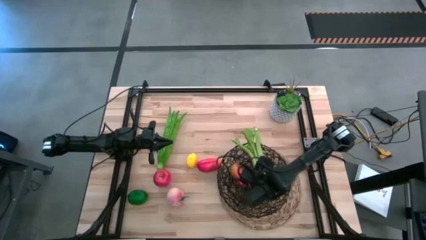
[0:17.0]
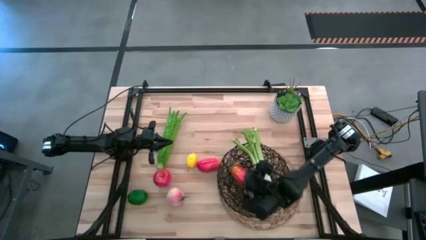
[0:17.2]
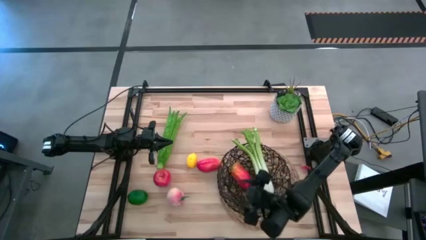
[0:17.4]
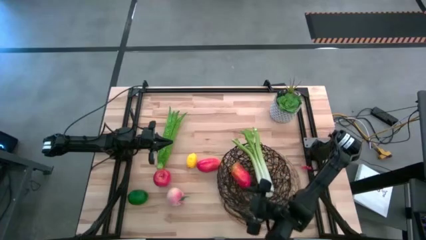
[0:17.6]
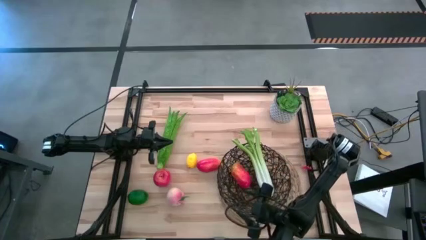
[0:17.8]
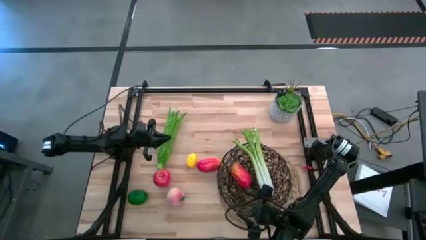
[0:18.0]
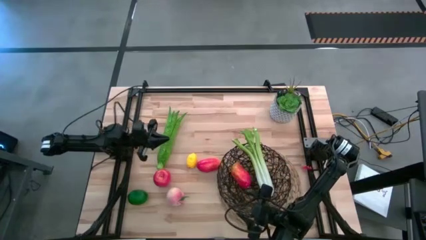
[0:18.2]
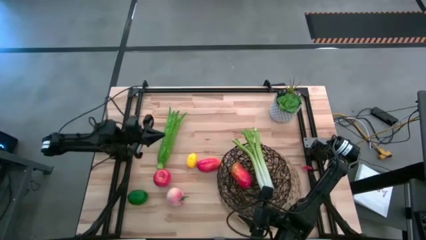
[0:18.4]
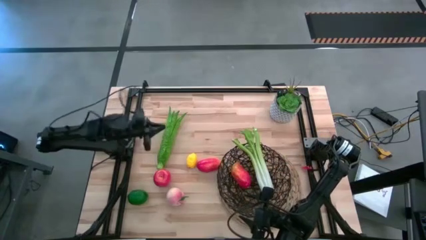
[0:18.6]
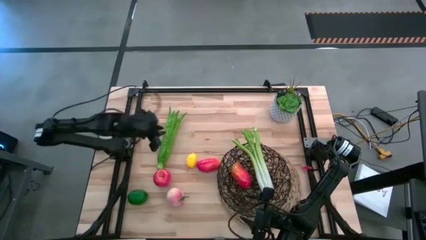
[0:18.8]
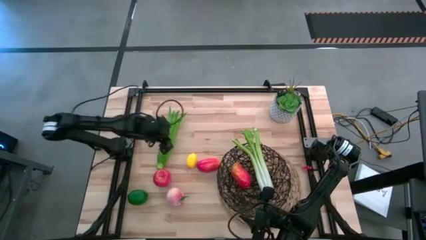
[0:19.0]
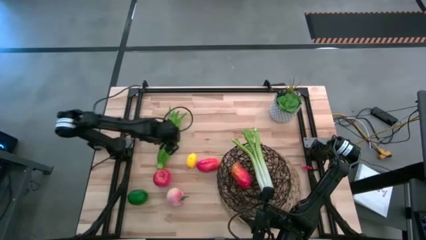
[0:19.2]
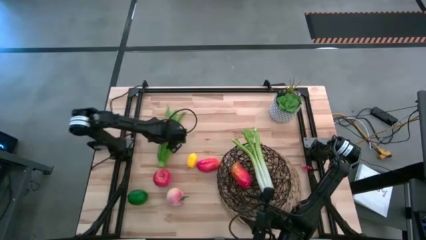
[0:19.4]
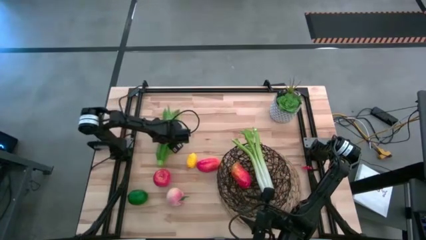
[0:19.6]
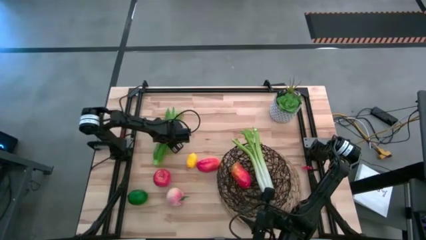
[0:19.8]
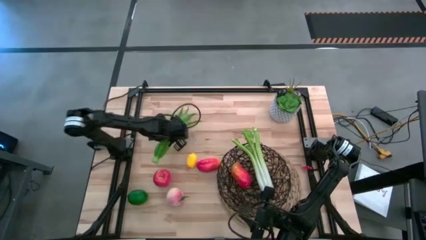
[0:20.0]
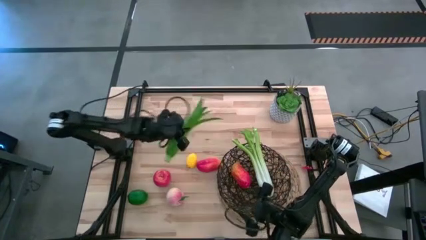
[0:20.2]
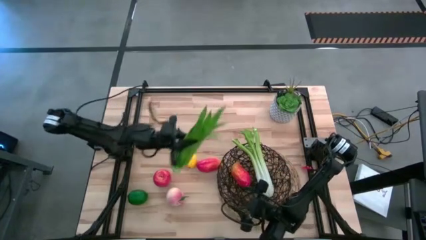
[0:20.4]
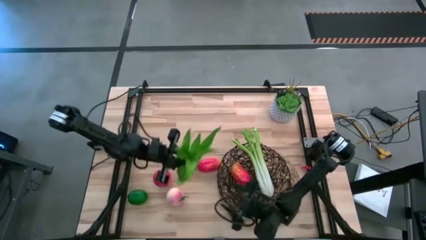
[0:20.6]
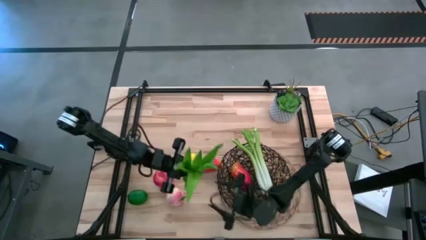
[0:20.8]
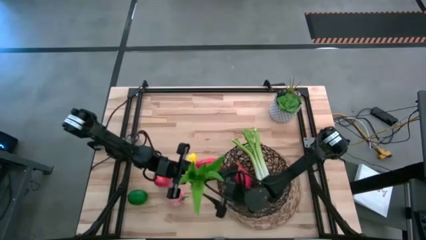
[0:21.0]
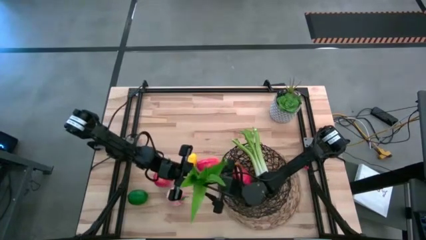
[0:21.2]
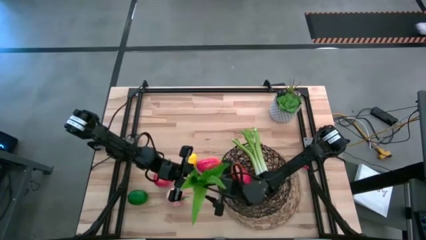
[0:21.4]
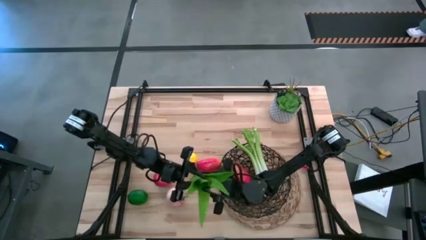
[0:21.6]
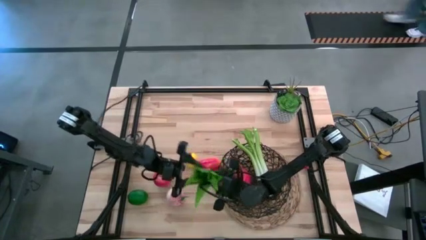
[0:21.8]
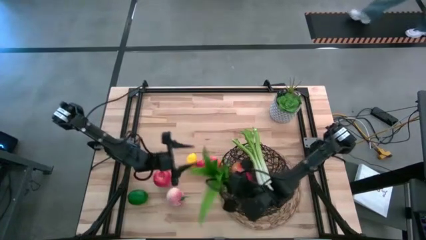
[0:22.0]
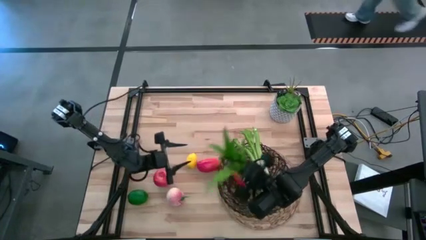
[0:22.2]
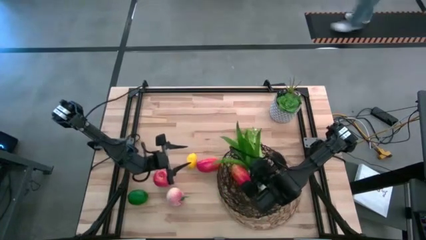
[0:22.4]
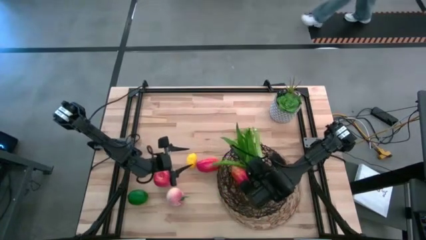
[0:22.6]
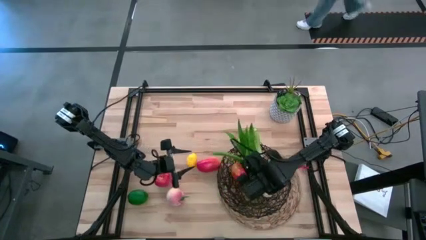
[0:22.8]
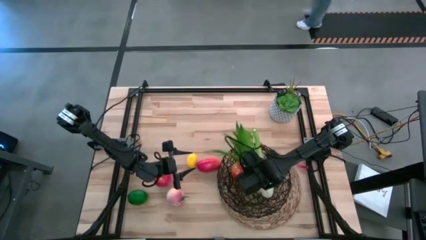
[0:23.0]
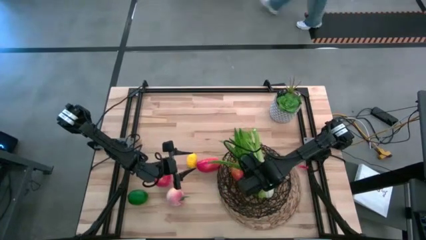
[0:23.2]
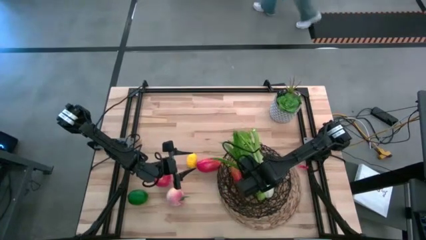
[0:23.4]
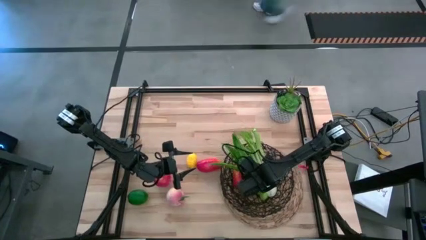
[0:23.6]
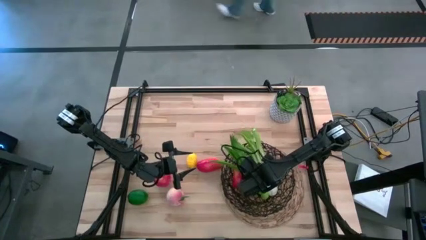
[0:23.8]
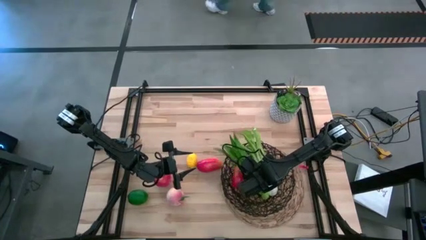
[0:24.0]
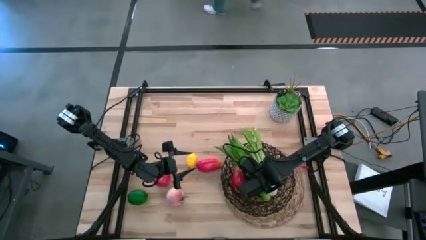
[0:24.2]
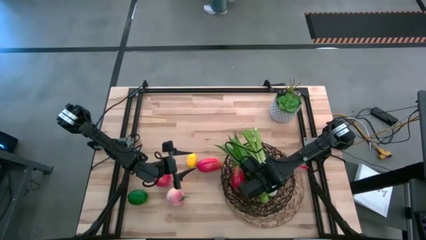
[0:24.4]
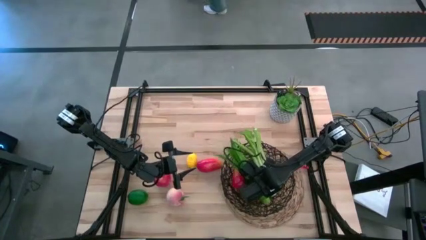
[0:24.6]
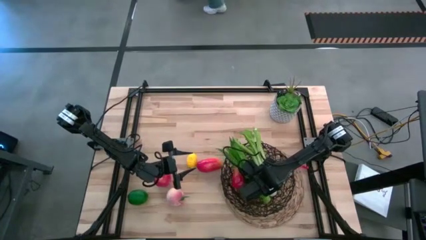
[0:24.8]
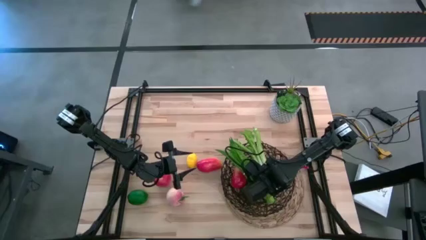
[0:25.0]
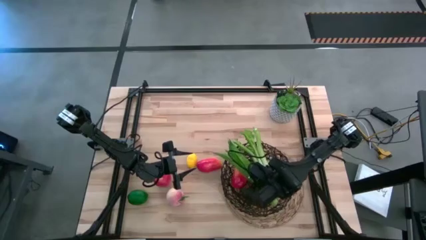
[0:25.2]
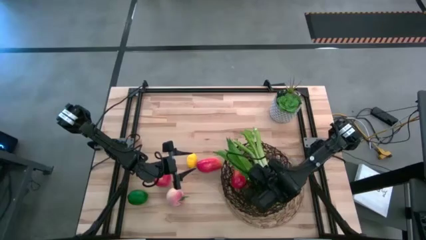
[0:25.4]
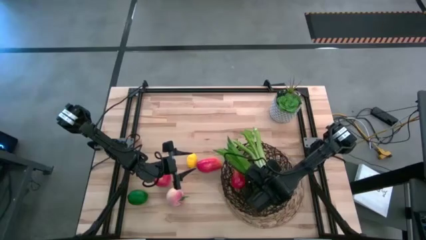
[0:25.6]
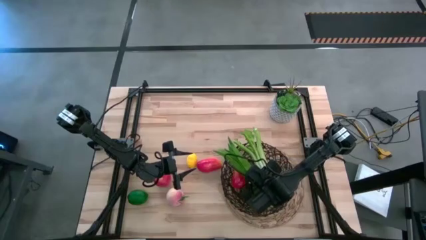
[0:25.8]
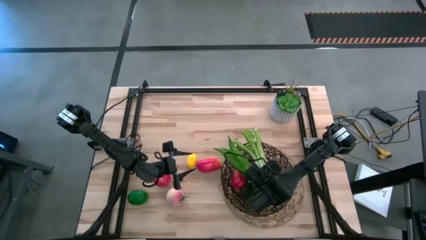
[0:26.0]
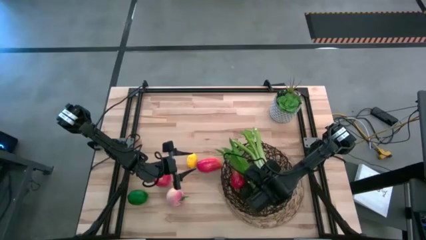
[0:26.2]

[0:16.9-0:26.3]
Task: Build produce basket
Put the lettuce into the wire basket

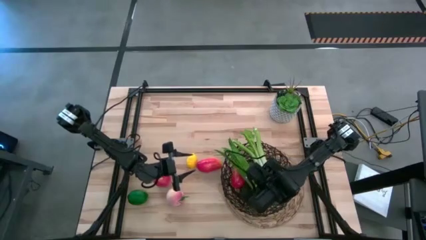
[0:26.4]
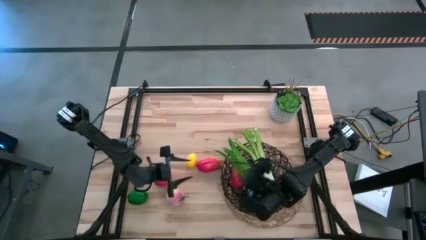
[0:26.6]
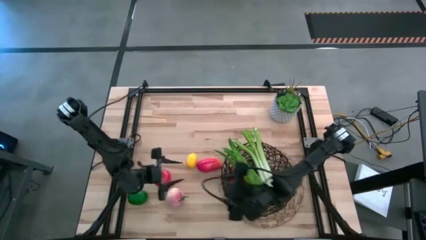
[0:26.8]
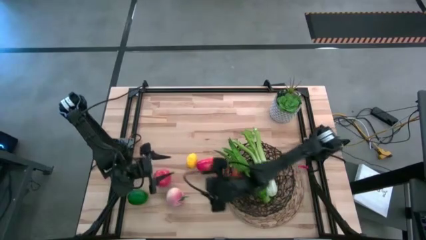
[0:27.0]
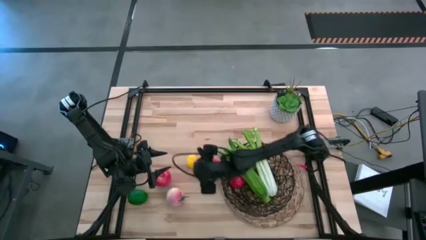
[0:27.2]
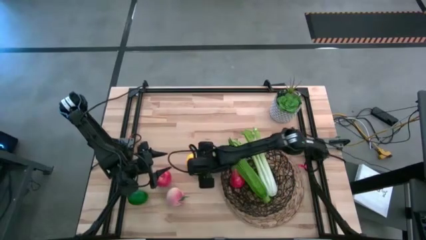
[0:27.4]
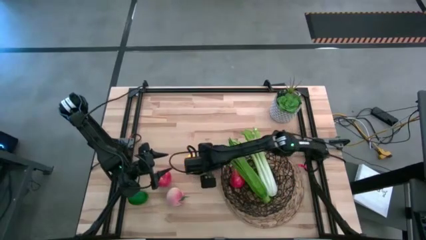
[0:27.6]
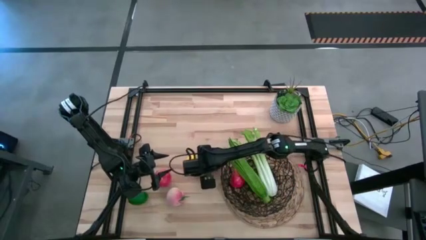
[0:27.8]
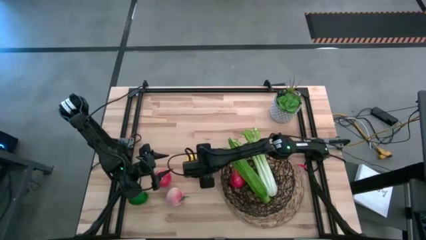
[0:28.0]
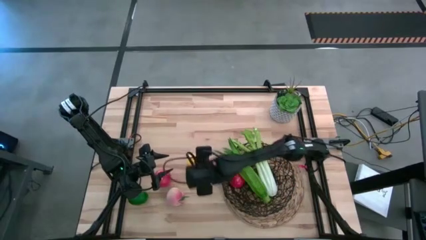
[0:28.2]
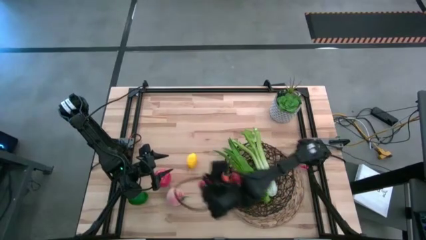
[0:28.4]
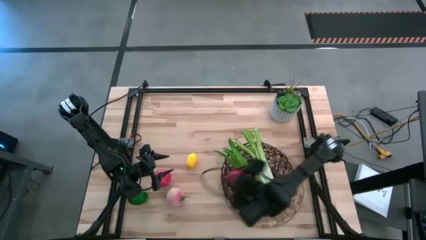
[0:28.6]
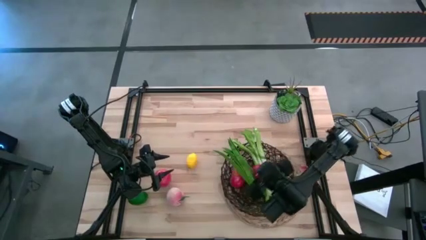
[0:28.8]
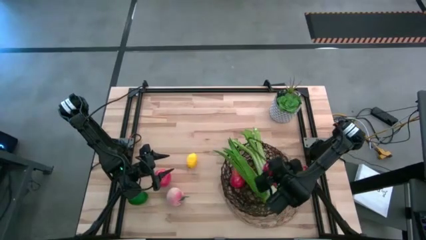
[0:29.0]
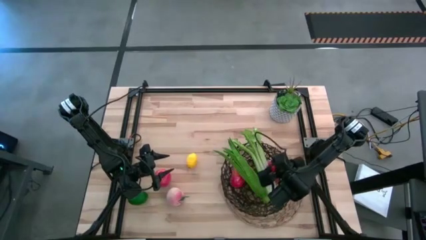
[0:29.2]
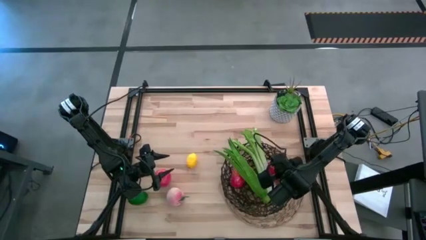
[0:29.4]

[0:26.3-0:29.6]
Put the red mango into the wire basket

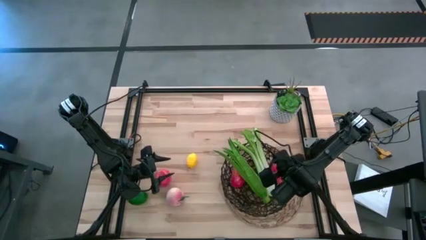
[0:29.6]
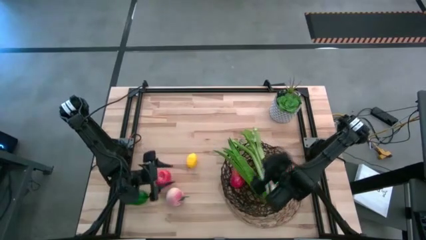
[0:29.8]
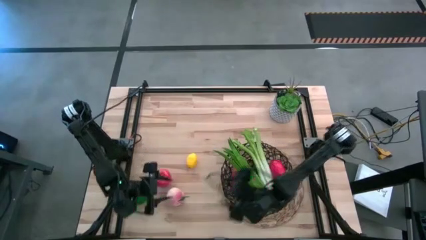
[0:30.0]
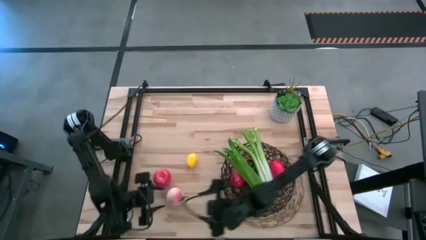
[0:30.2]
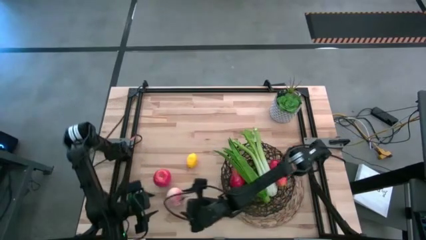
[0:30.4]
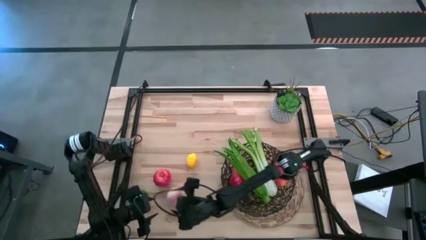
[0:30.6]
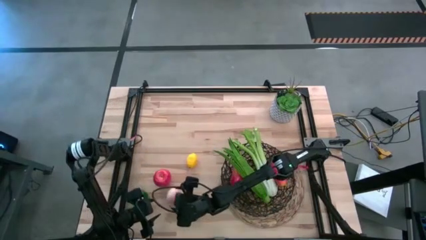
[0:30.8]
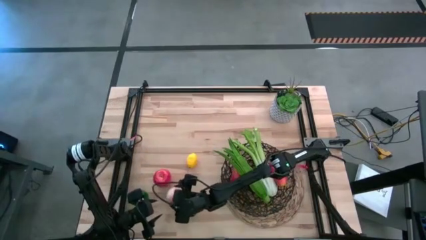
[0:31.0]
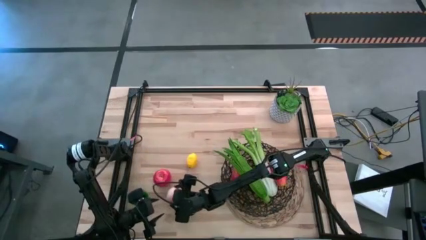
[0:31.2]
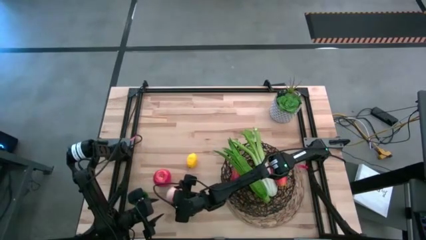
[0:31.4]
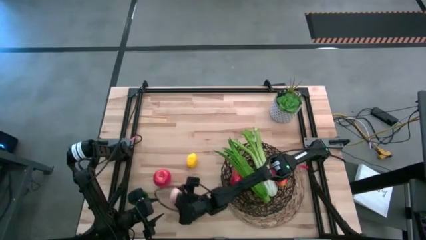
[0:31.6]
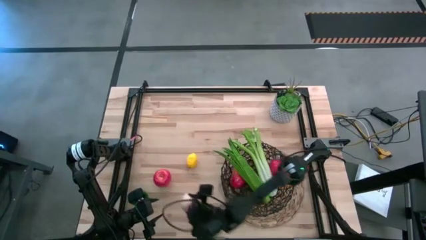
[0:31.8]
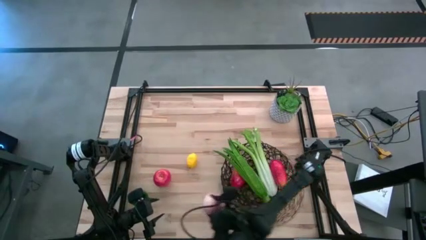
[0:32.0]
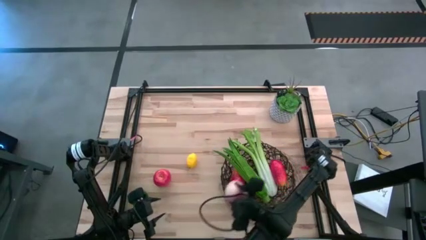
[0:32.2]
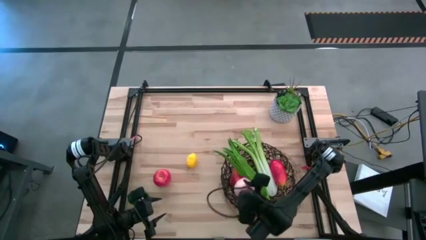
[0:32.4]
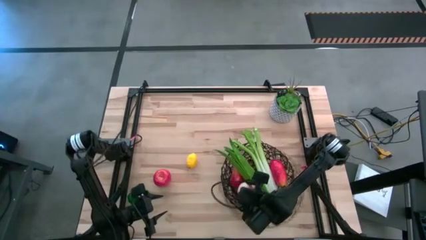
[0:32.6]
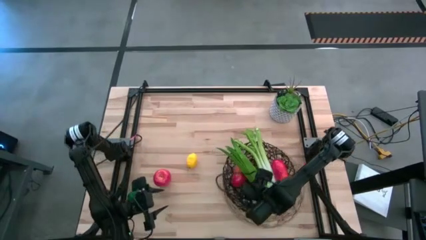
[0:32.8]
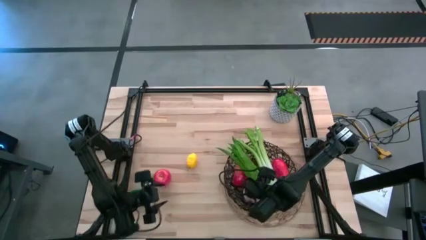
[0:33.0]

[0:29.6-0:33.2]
Put the peach into the wire basket
